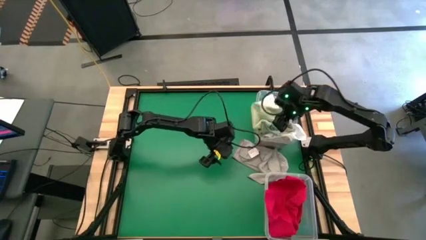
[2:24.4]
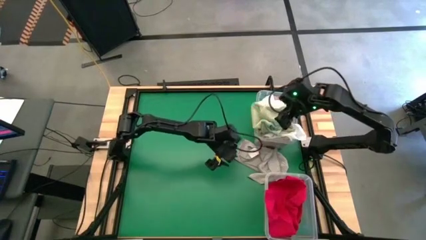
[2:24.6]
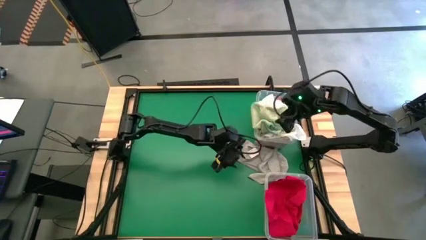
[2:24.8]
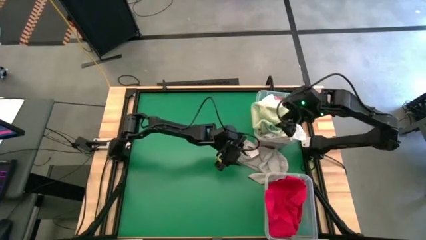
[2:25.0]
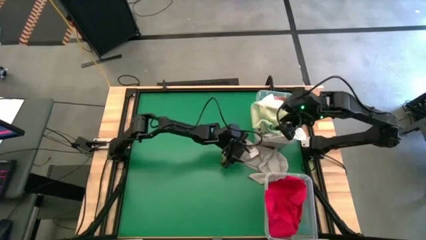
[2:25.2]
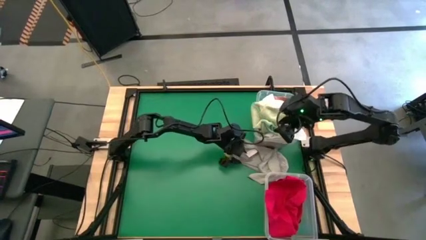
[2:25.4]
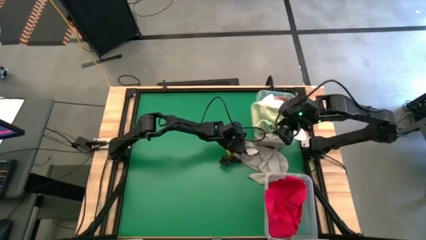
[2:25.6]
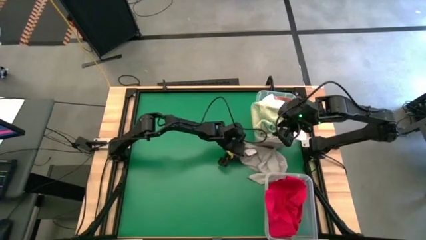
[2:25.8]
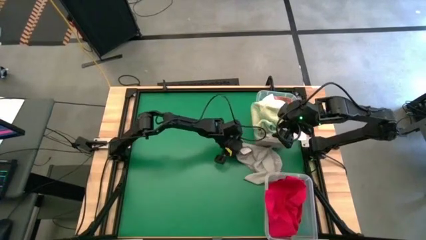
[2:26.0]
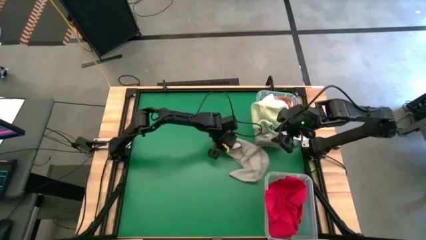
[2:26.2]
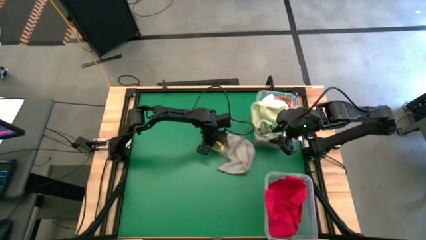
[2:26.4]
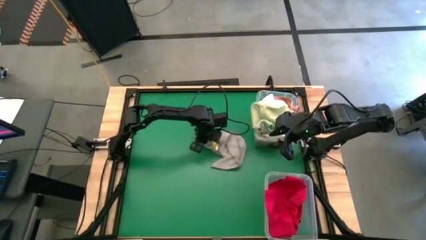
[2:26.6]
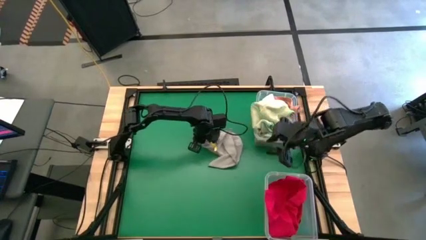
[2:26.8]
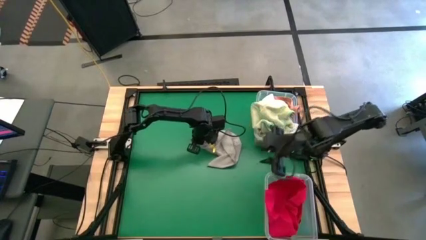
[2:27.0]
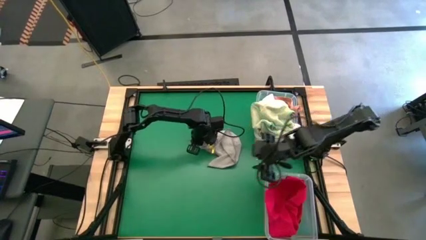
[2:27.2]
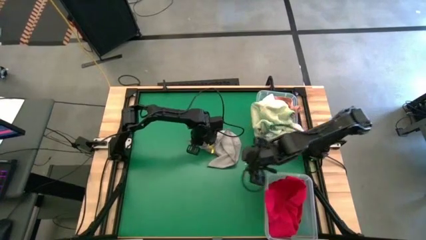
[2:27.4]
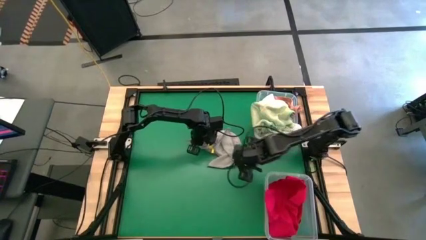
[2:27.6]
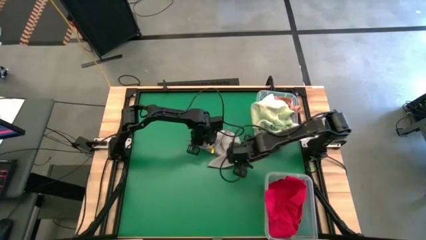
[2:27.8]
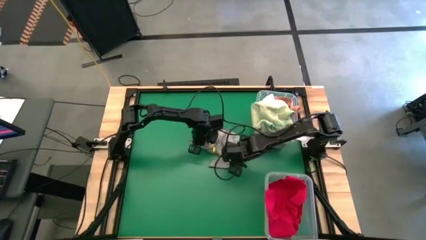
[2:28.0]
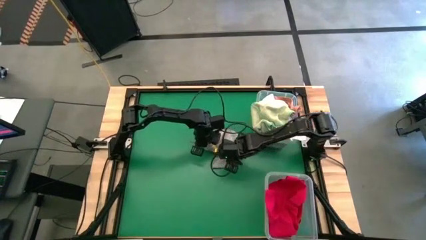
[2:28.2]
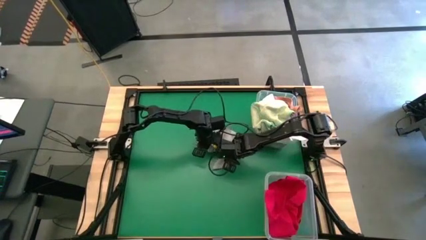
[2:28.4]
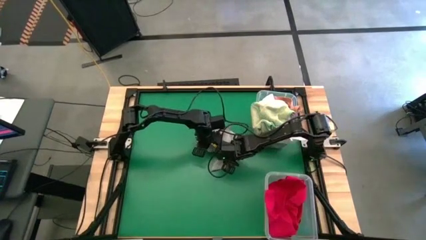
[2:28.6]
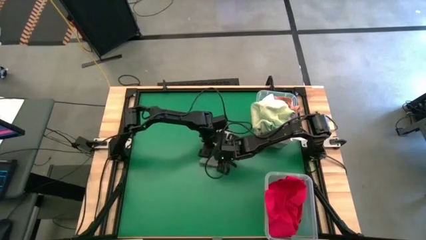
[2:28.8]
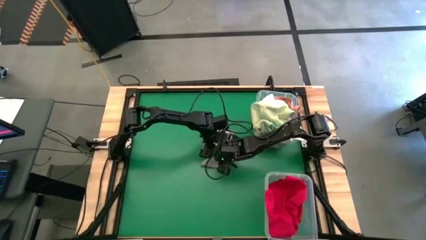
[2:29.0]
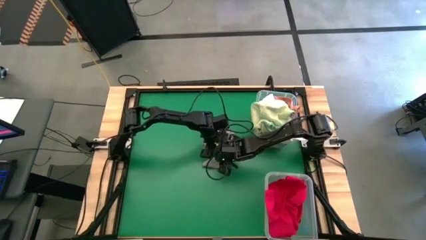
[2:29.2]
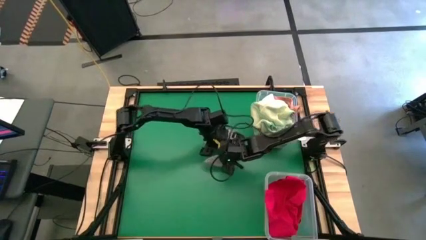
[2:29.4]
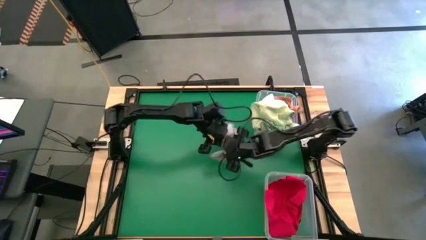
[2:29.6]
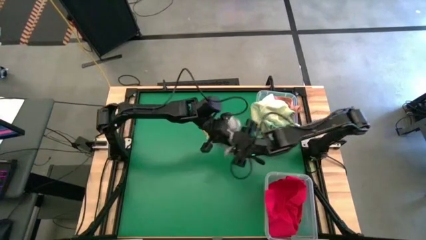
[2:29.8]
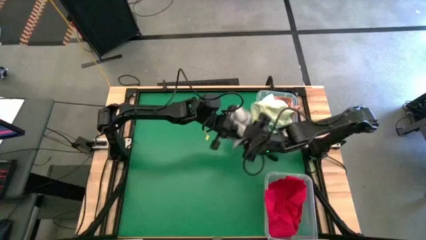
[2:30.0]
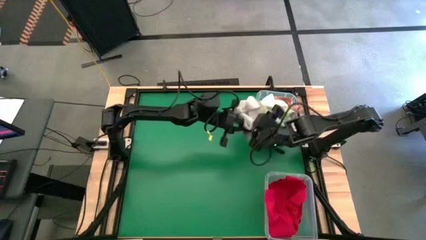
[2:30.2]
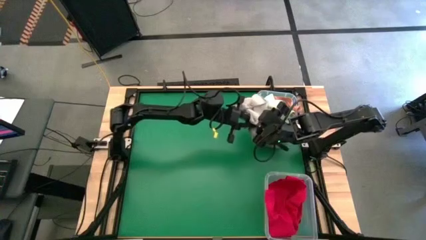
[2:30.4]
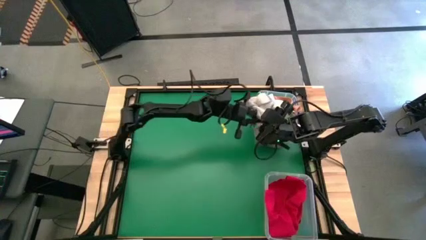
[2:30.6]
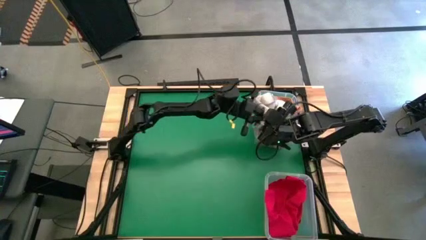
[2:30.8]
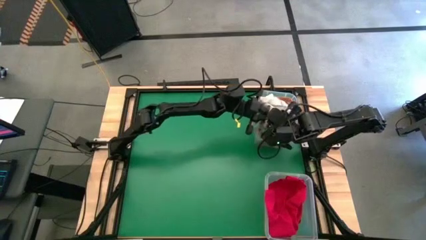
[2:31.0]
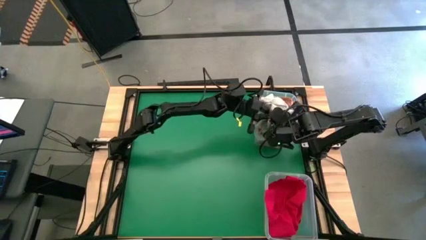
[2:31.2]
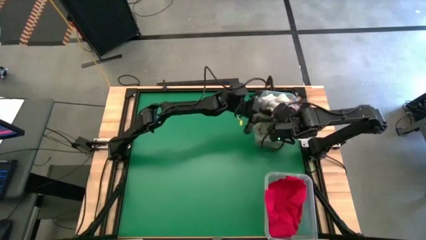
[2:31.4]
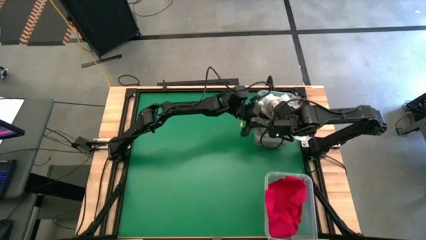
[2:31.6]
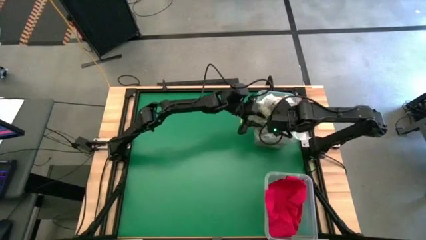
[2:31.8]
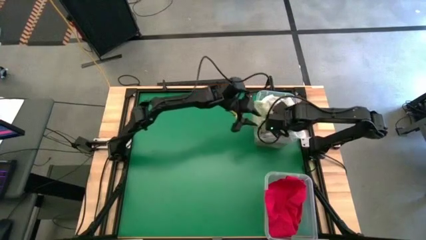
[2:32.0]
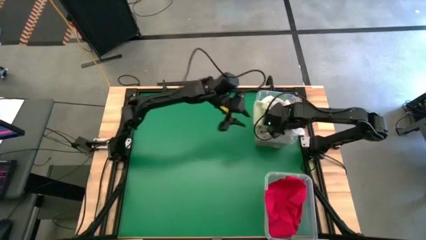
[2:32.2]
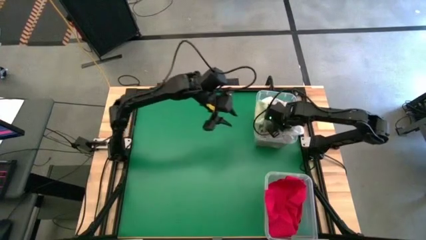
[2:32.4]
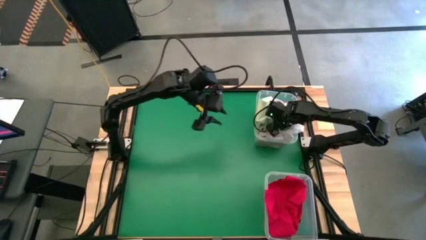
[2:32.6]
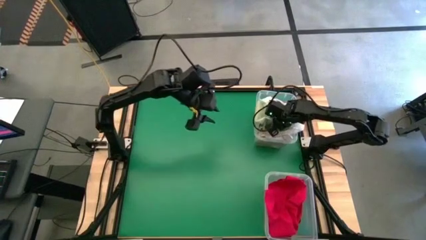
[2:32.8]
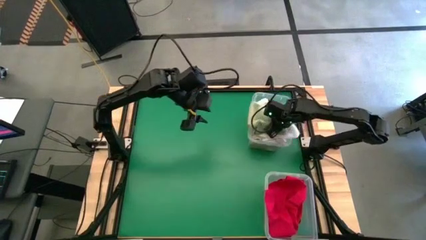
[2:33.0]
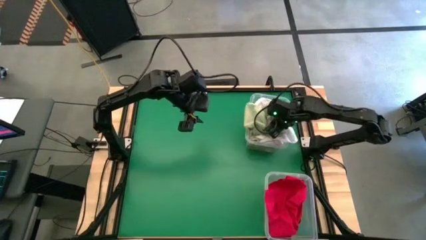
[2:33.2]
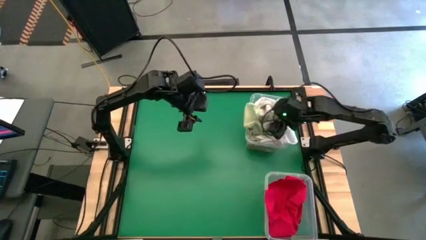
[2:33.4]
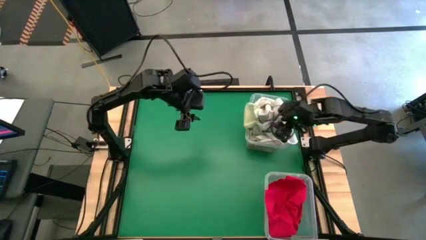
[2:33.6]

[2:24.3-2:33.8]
Task: Sort towels by color in basket
Put the gray towel into the top transparent bin

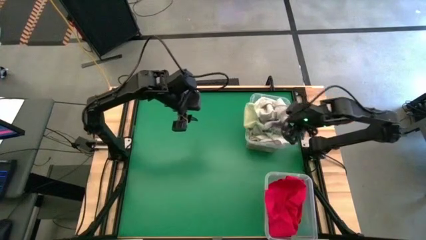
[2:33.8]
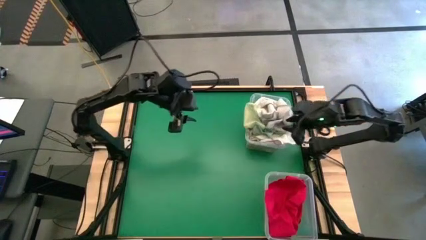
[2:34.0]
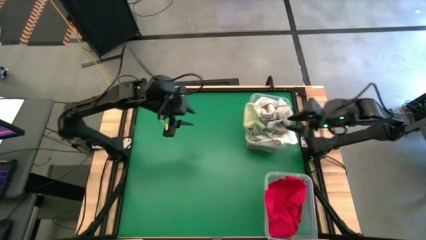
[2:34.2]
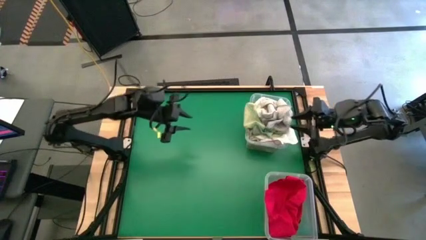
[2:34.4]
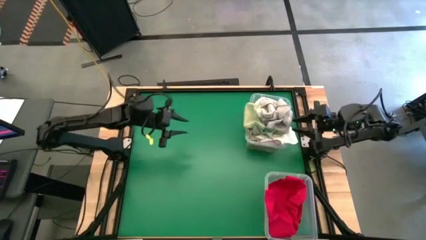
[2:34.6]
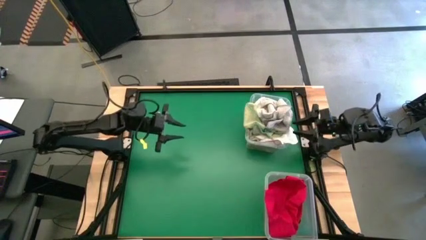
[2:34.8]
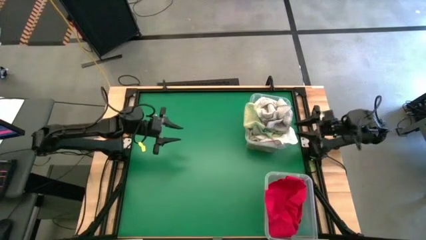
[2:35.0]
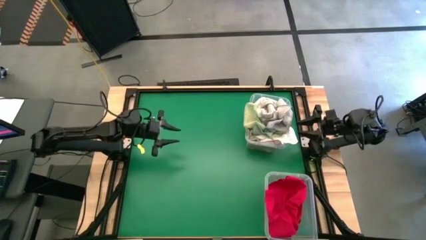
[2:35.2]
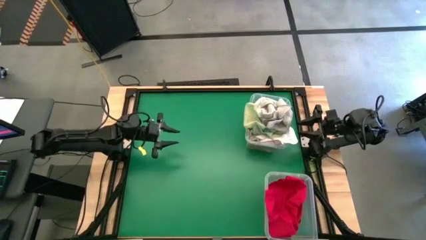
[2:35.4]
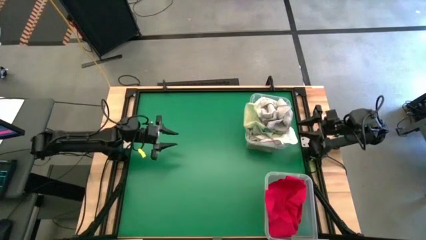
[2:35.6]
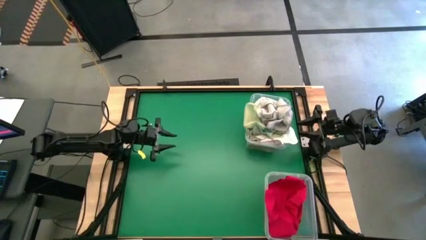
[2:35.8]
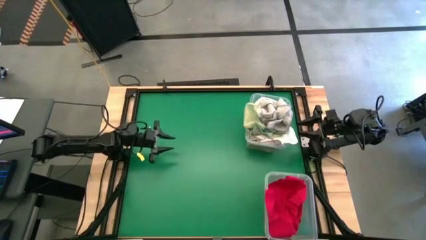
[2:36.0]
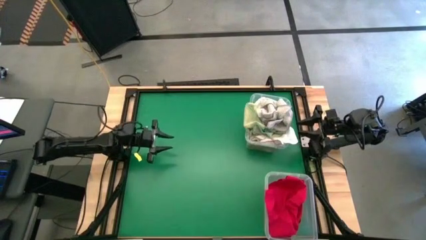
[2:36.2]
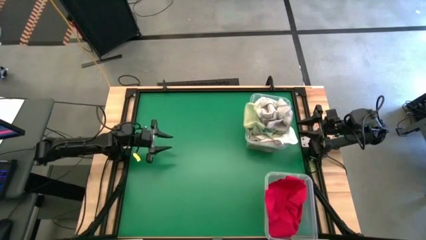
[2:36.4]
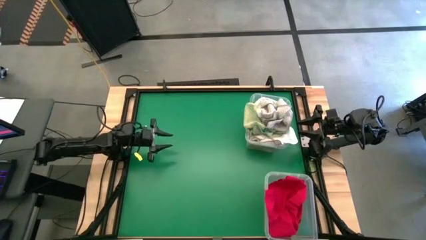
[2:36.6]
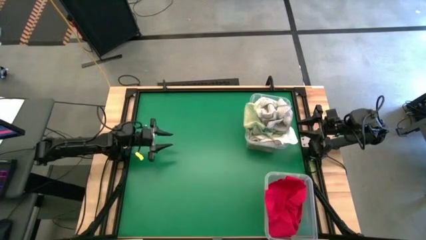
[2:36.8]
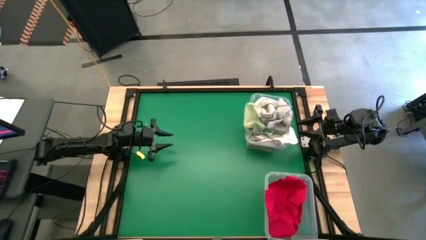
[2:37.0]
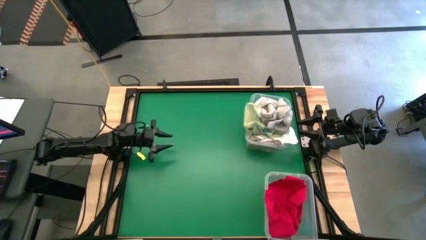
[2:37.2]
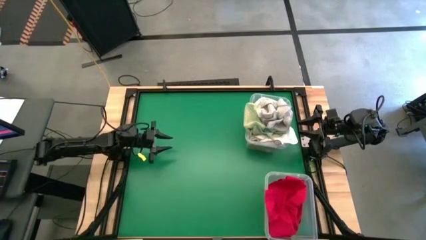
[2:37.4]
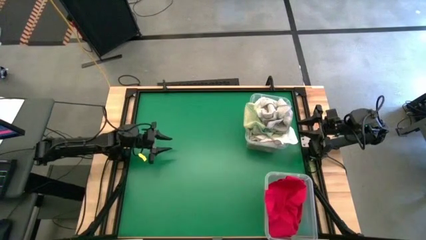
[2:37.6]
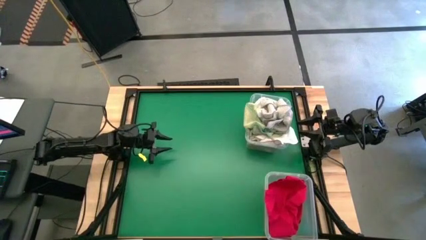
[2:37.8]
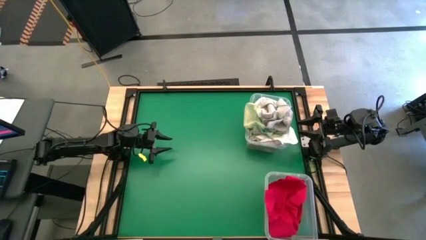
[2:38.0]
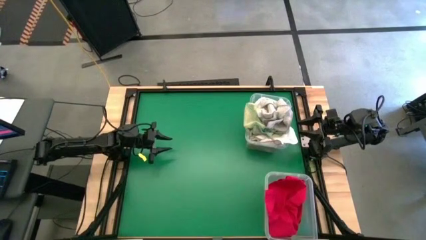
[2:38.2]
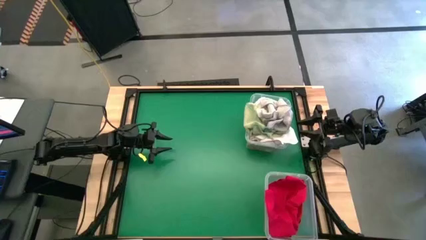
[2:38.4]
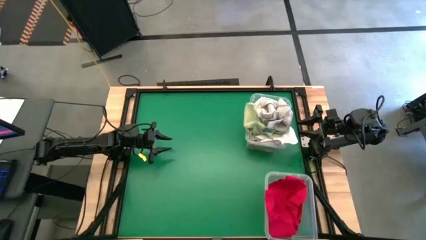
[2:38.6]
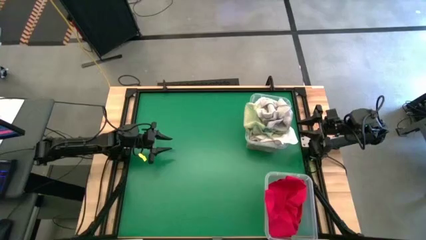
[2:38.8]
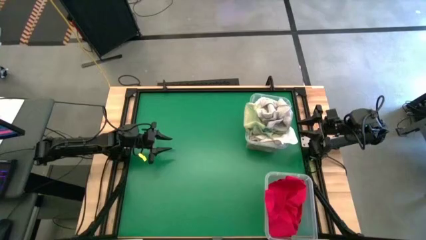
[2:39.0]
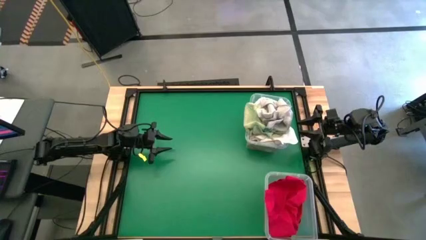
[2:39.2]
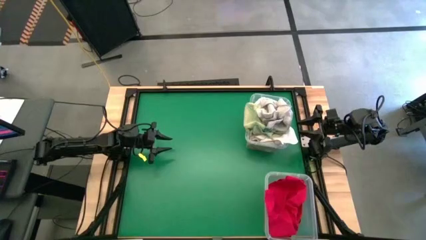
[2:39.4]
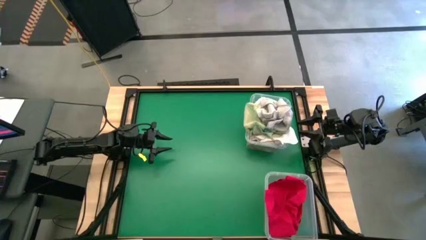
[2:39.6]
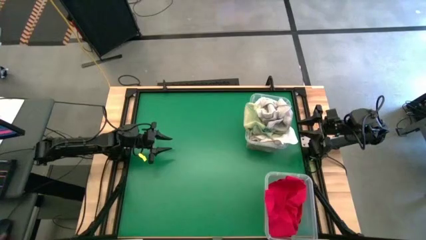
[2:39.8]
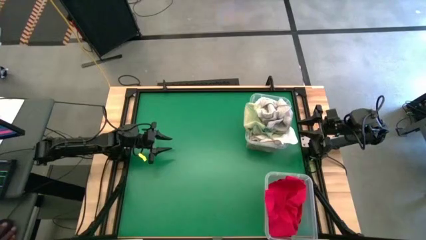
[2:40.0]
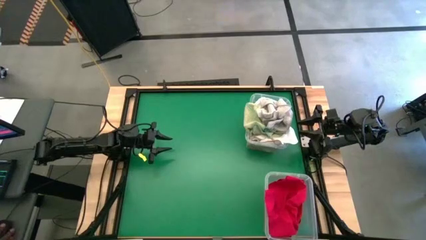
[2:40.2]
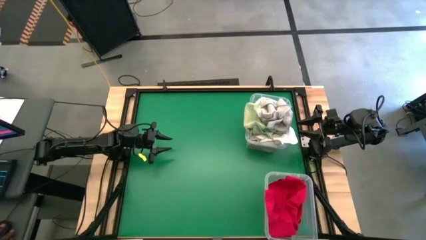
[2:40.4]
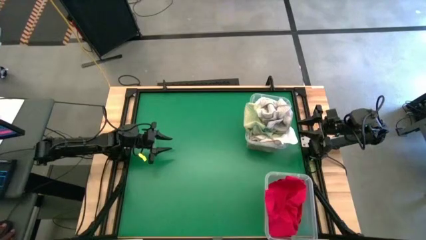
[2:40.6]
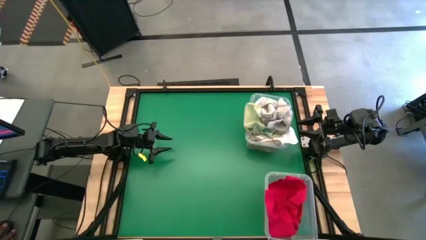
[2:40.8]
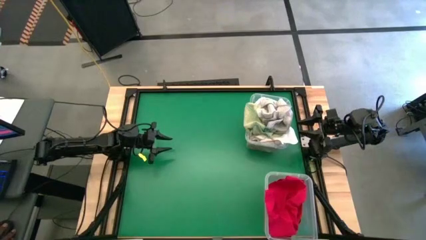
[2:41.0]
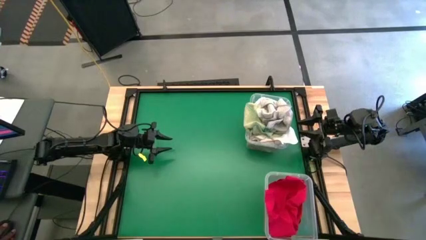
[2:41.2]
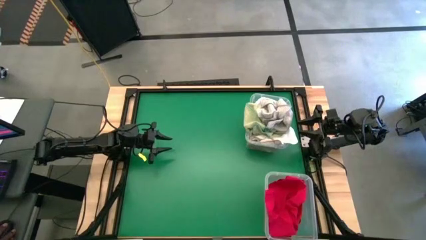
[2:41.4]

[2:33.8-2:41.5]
Return to Home Position
